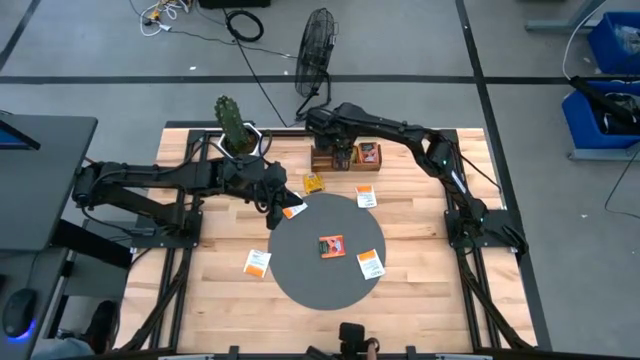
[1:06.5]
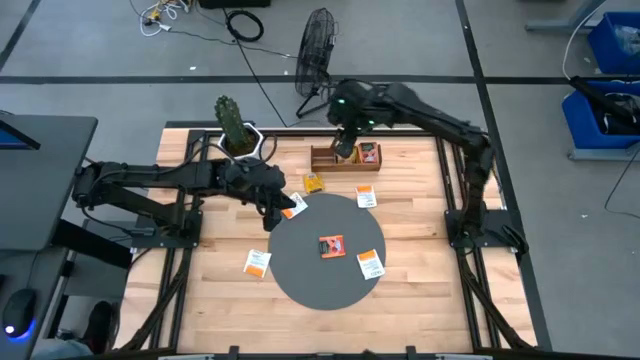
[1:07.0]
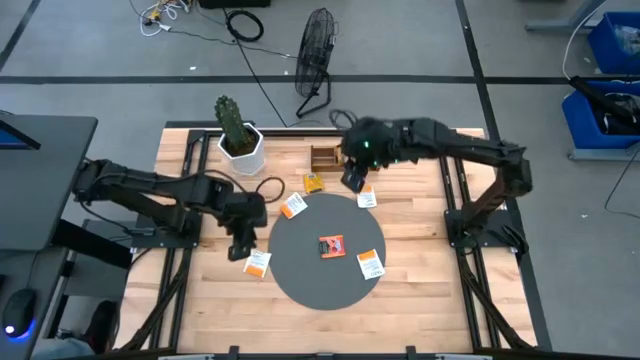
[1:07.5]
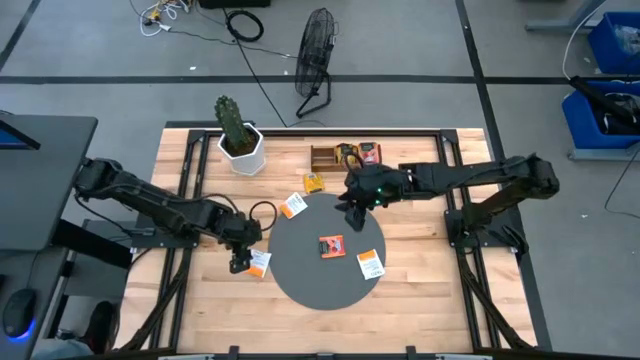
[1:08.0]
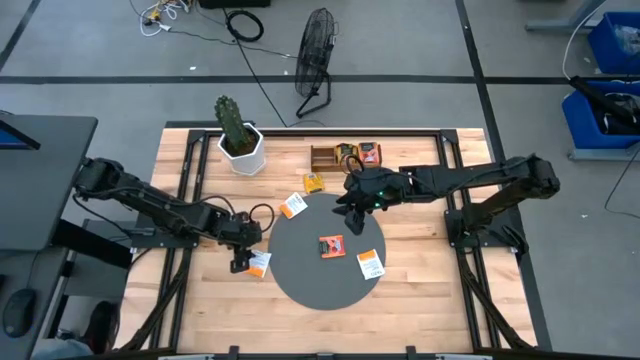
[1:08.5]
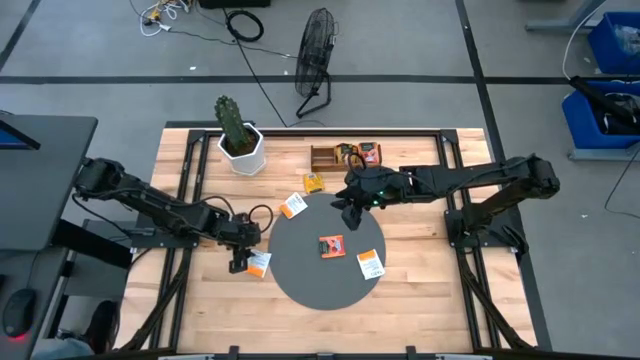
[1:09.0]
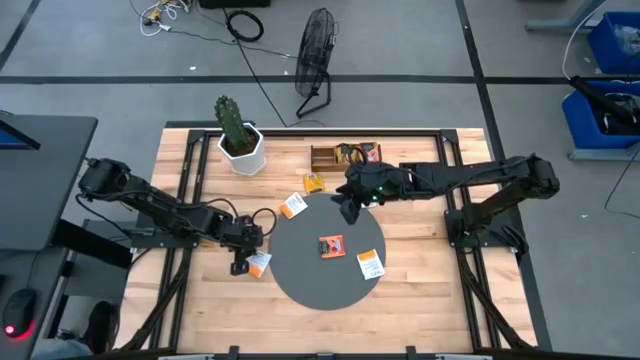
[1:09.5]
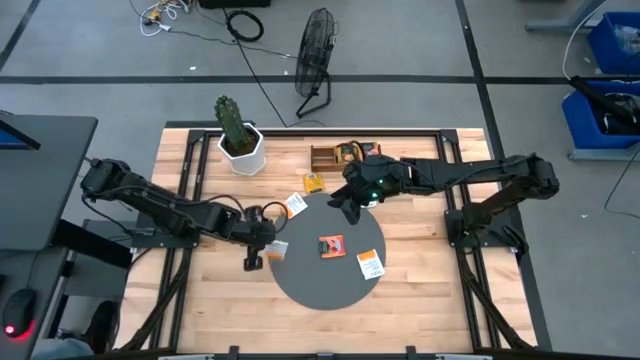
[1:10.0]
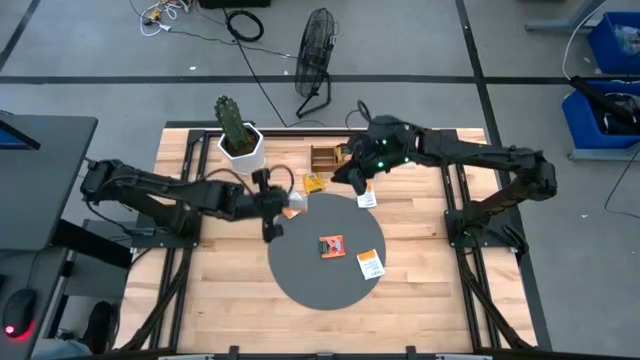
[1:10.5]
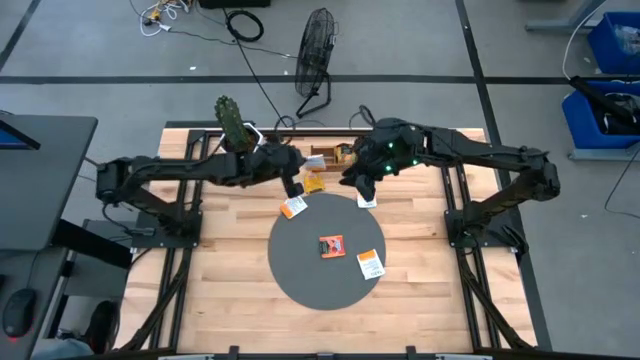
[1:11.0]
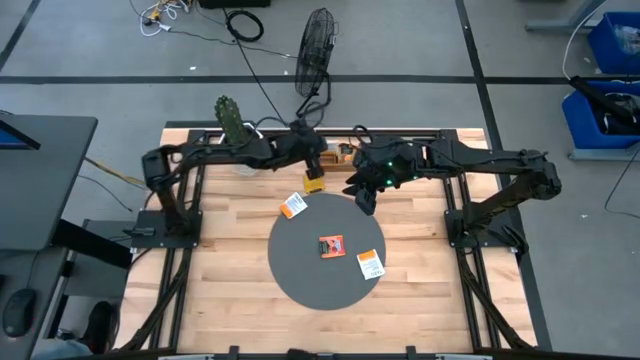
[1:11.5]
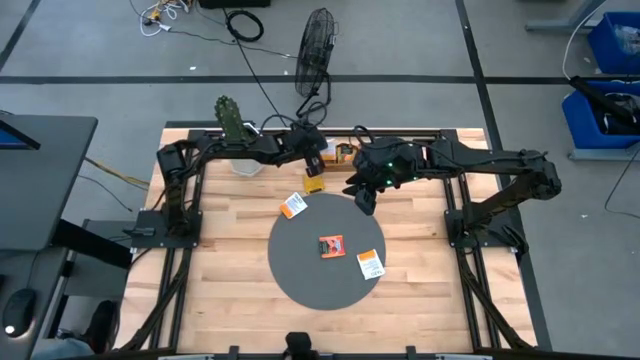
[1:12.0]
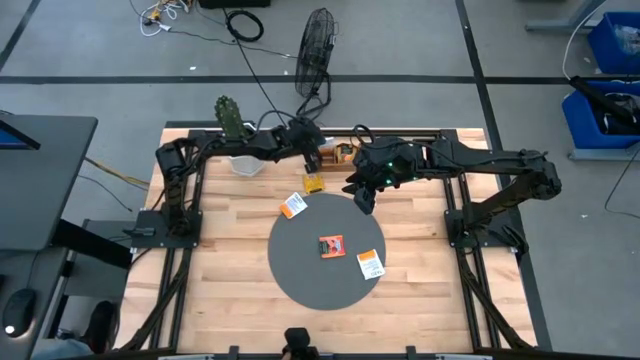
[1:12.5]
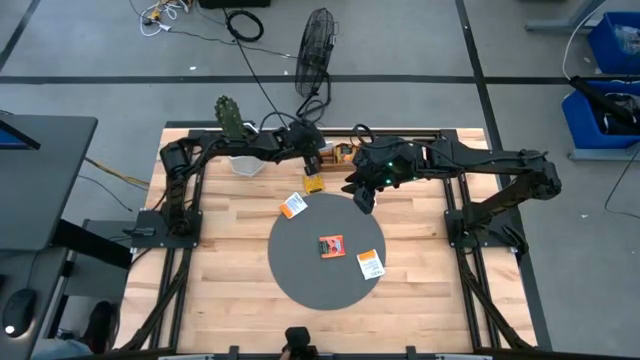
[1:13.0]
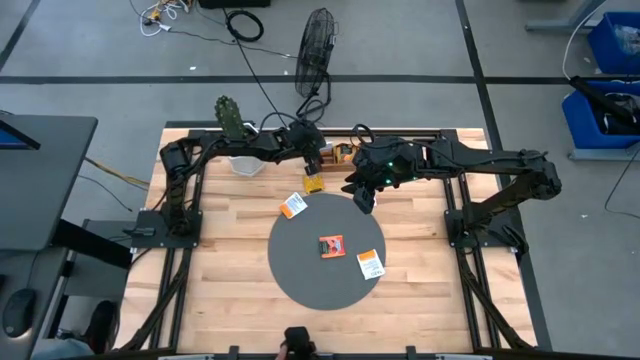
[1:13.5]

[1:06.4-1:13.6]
Task: Pick & Place Tea
Put the white tea bag into the left section of the wooden organizer

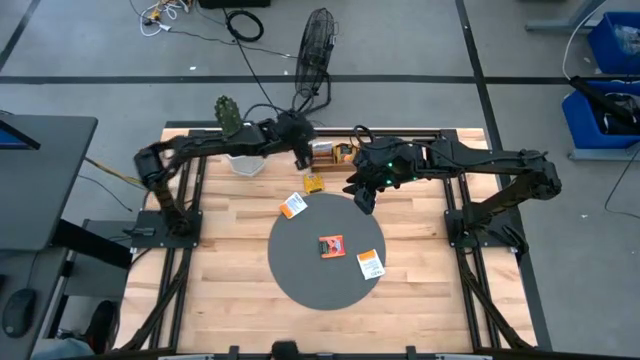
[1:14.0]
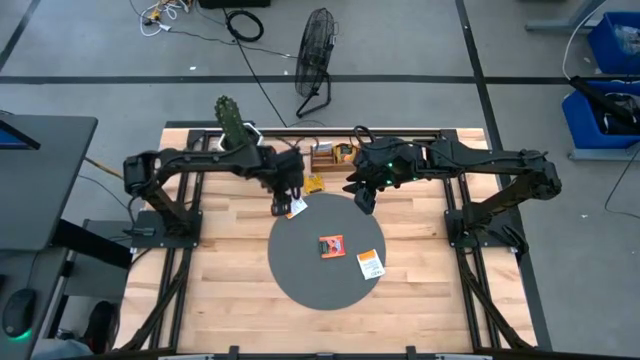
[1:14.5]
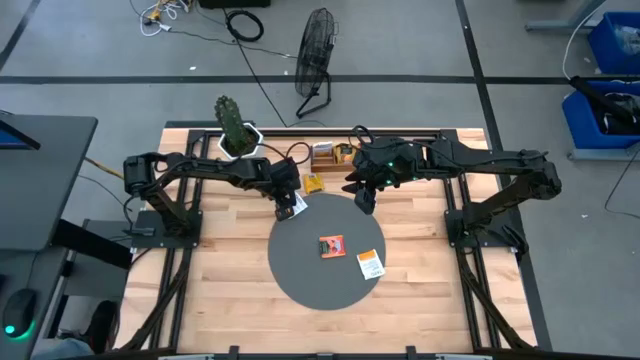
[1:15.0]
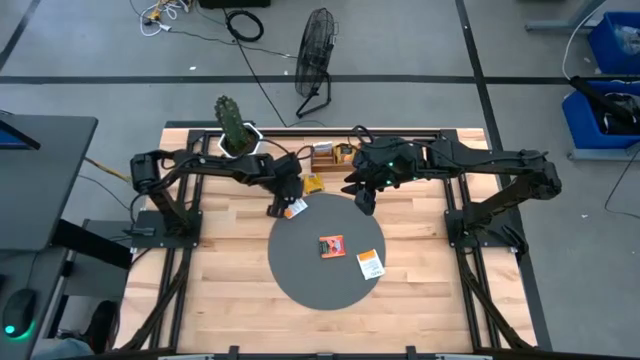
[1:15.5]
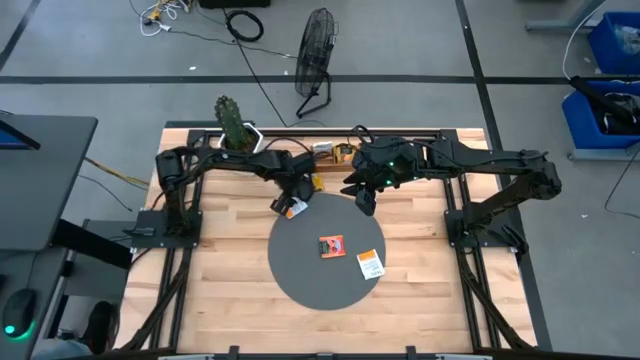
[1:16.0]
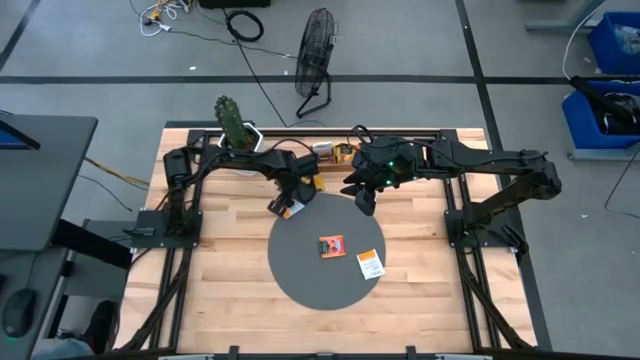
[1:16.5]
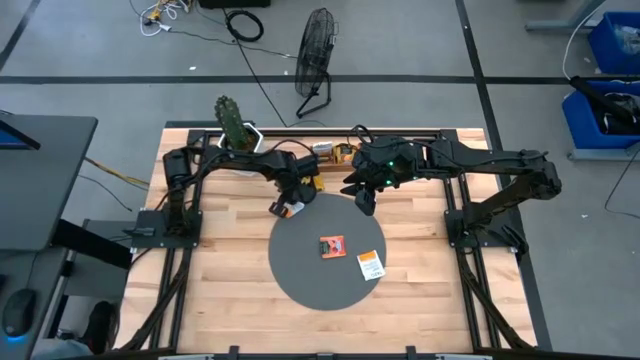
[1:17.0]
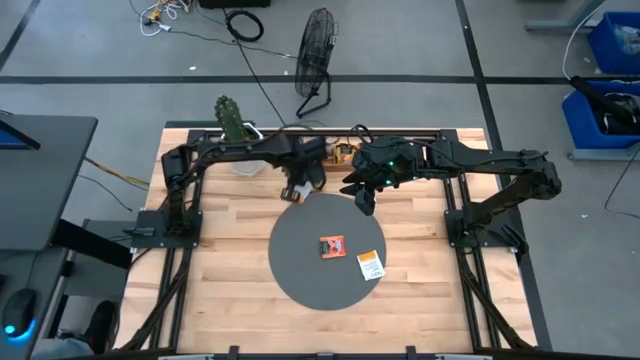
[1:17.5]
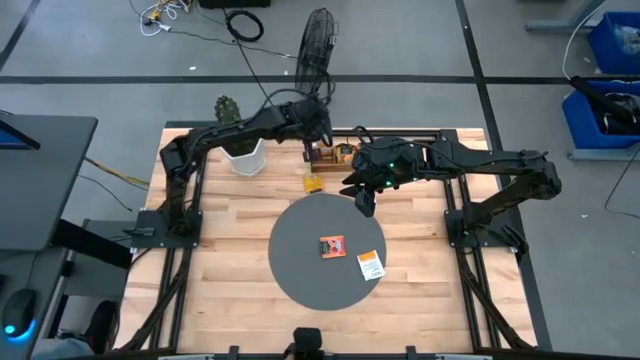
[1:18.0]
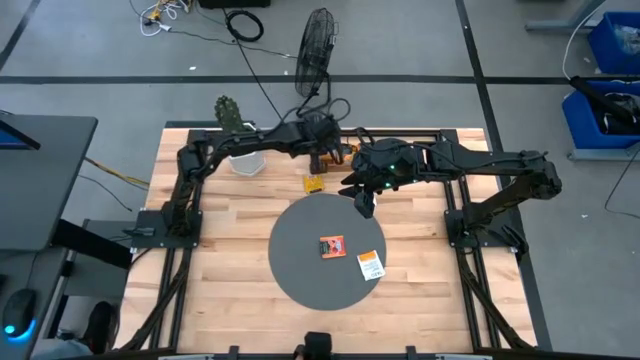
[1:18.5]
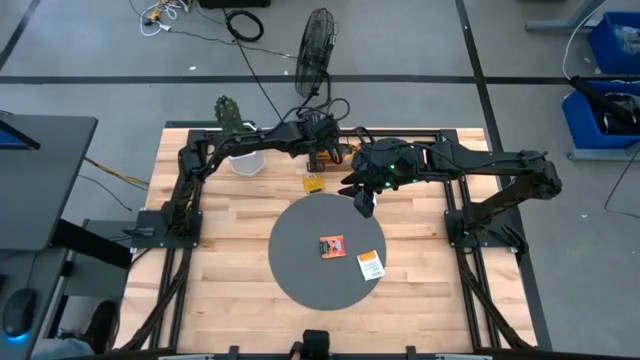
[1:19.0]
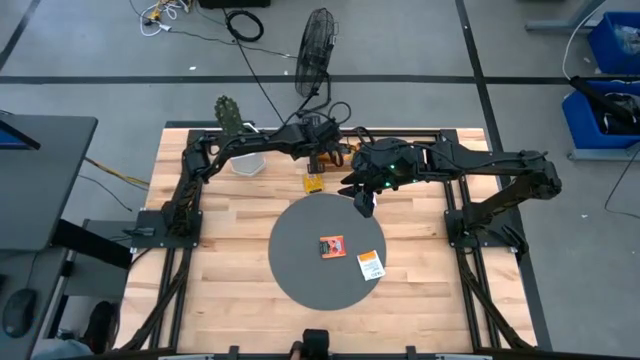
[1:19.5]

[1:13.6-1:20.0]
Put the white tea bag into the left section of the wooden organizer

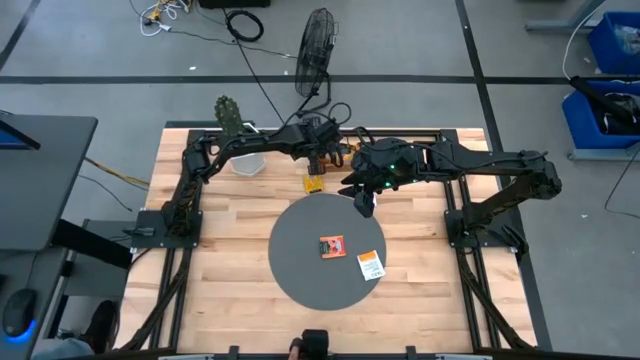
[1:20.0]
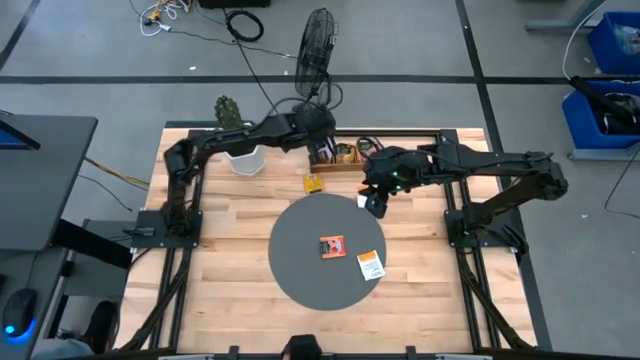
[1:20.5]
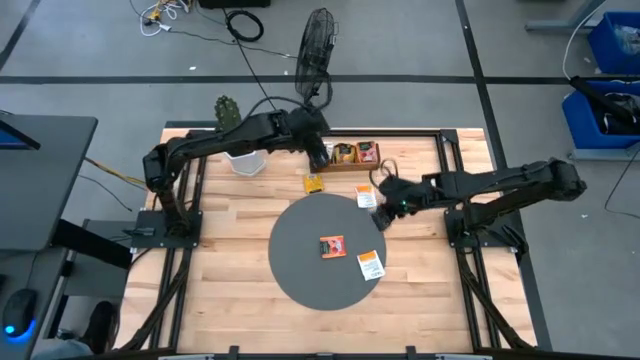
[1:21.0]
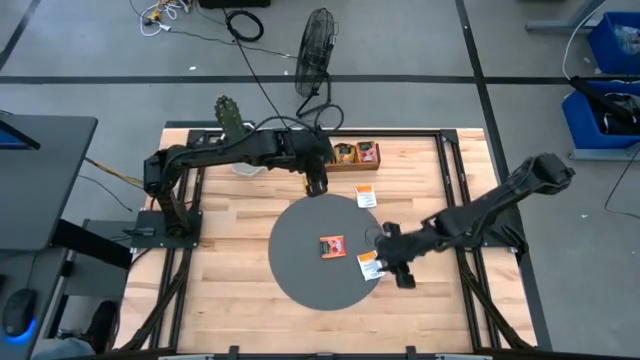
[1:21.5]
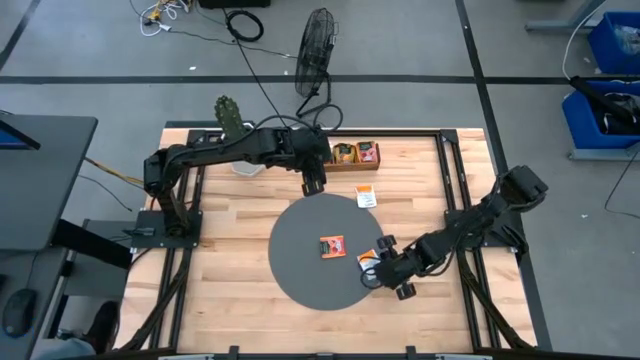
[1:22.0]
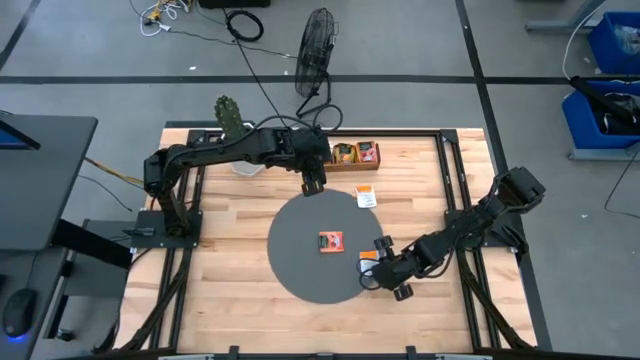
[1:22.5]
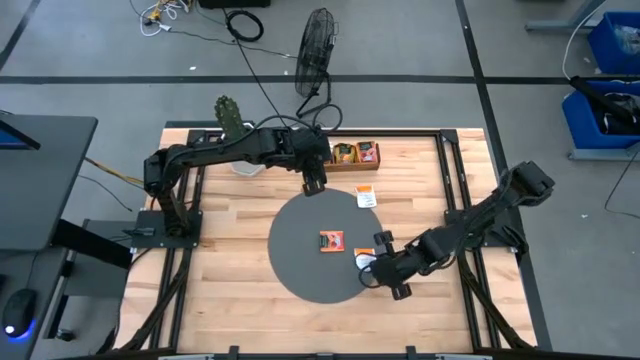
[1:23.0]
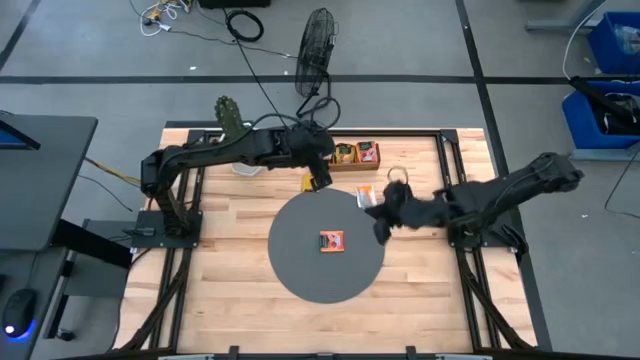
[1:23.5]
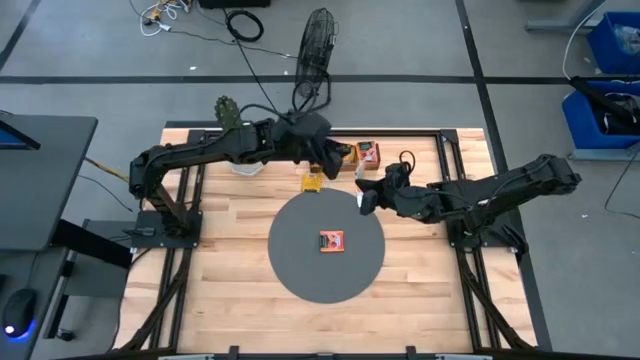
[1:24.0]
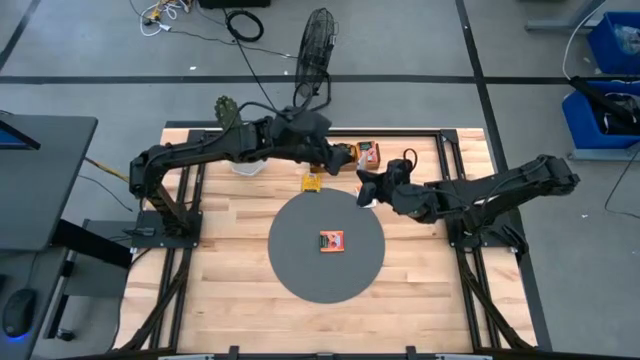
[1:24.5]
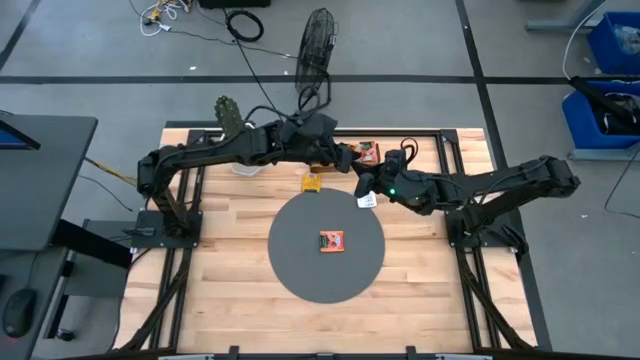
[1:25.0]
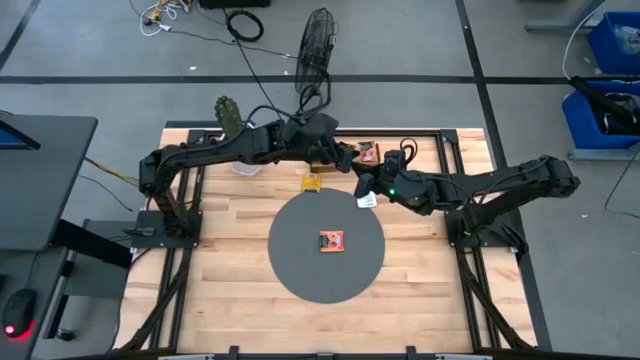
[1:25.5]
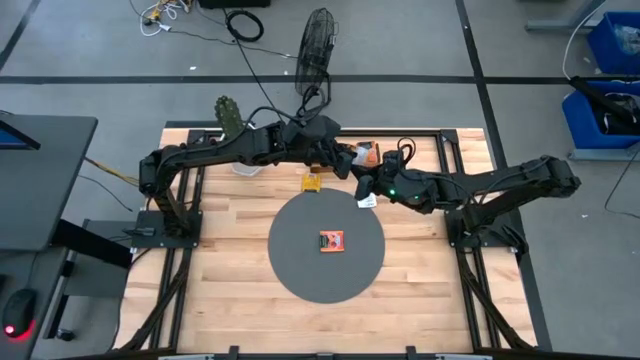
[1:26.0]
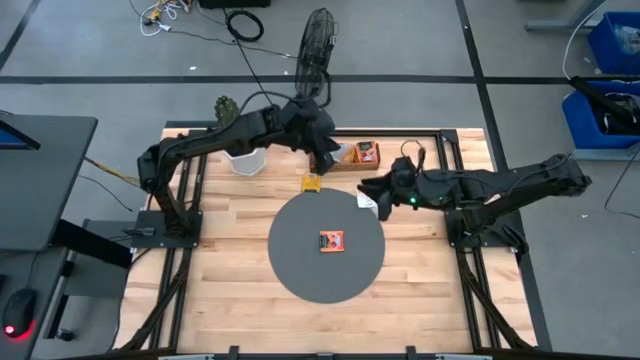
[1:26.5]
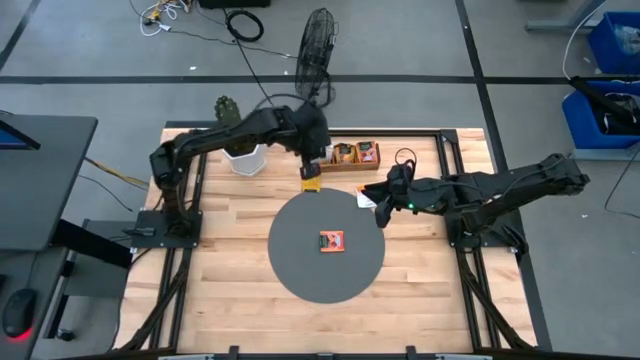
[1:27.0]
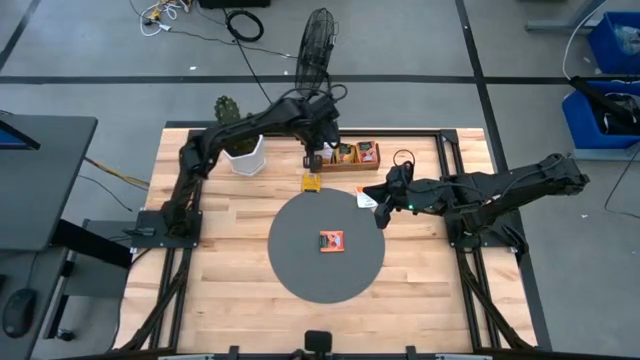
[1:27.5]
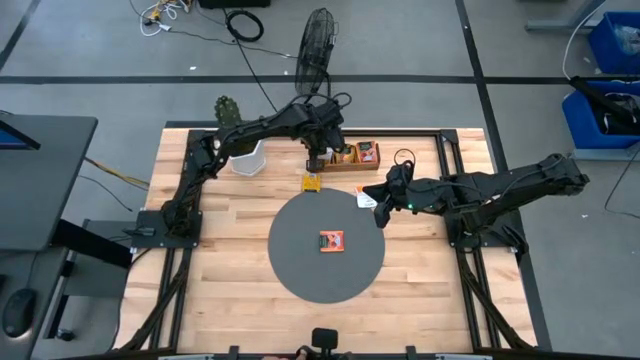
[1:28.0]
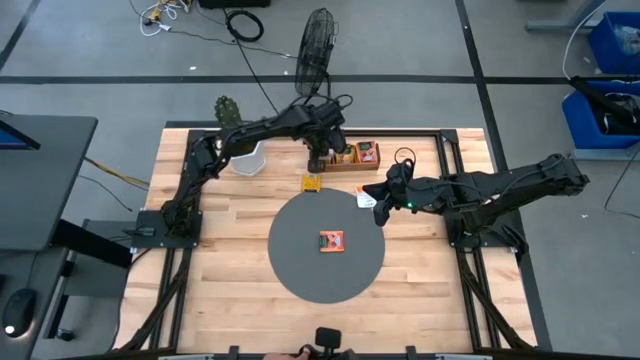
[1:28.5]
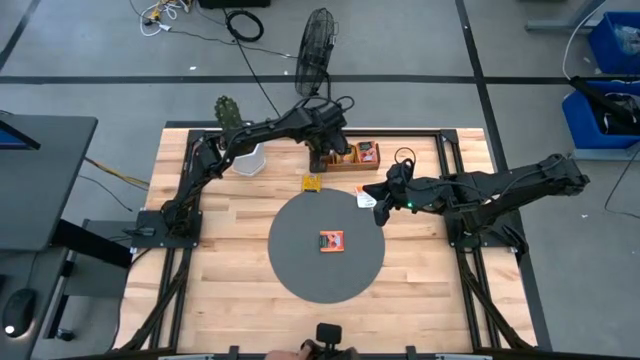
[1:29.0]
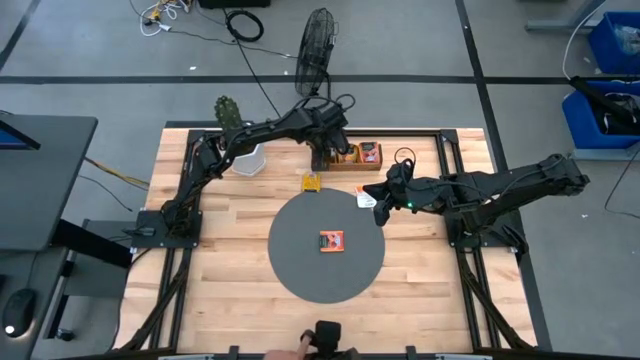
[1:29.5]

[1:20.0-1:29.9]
Put the white tea bag into the left section of the wooden organizer
